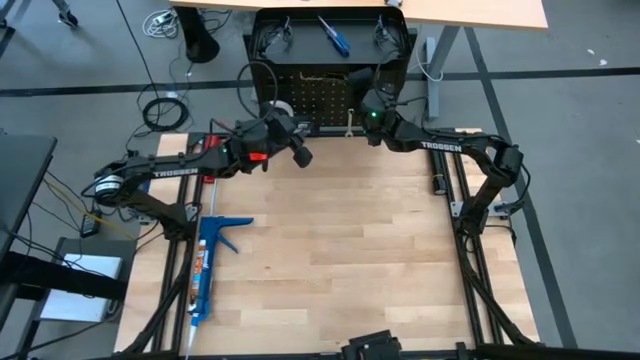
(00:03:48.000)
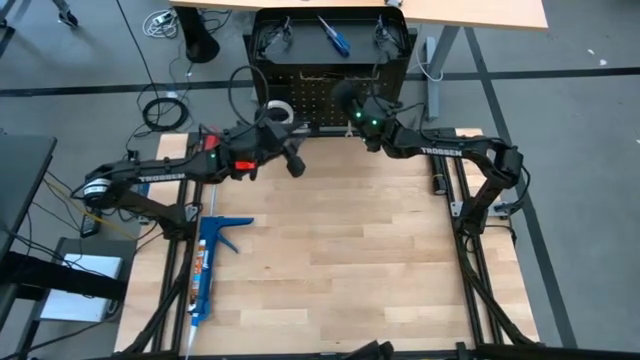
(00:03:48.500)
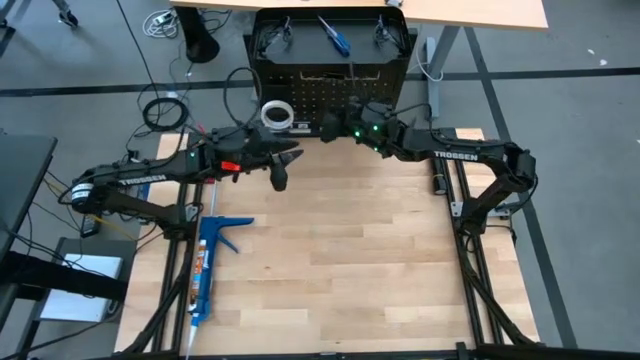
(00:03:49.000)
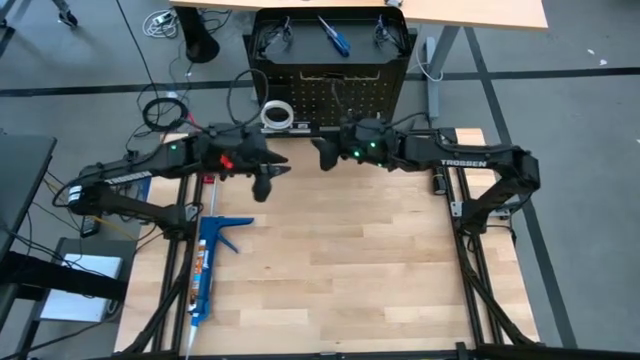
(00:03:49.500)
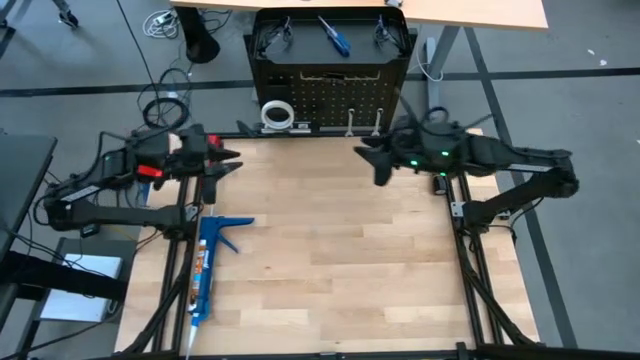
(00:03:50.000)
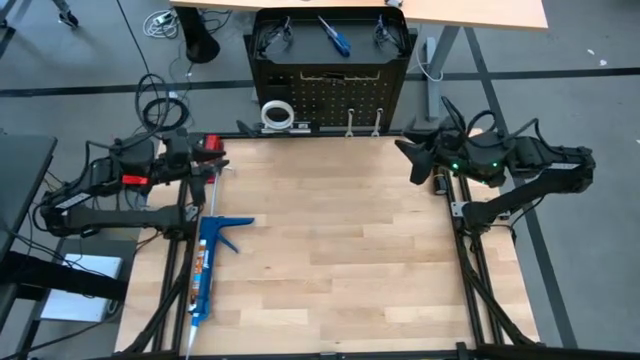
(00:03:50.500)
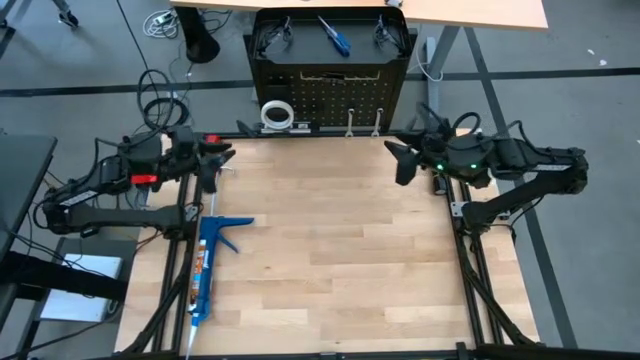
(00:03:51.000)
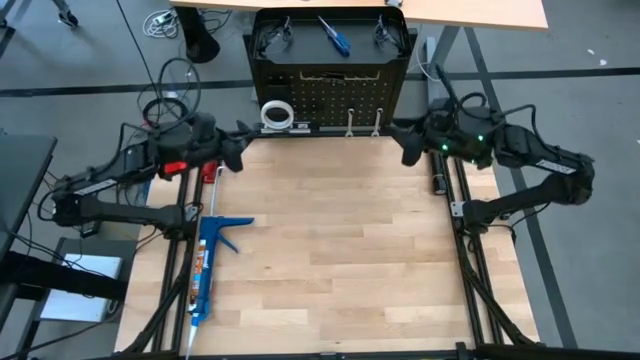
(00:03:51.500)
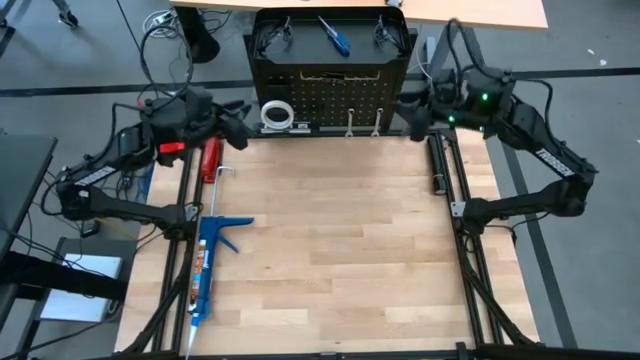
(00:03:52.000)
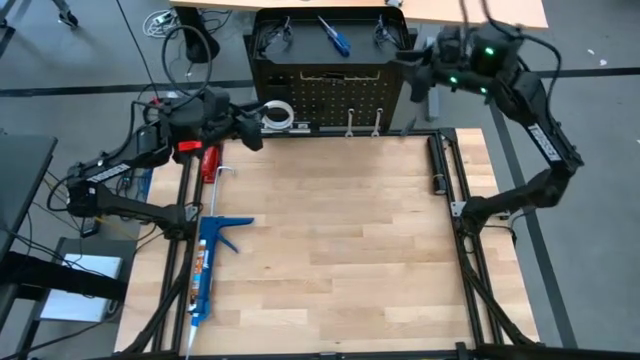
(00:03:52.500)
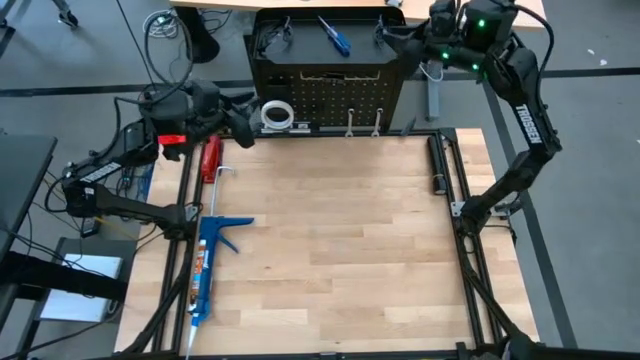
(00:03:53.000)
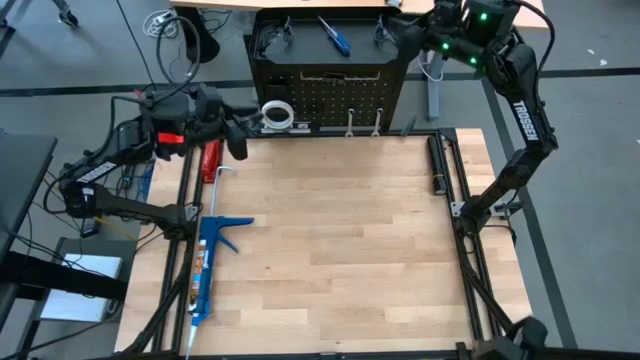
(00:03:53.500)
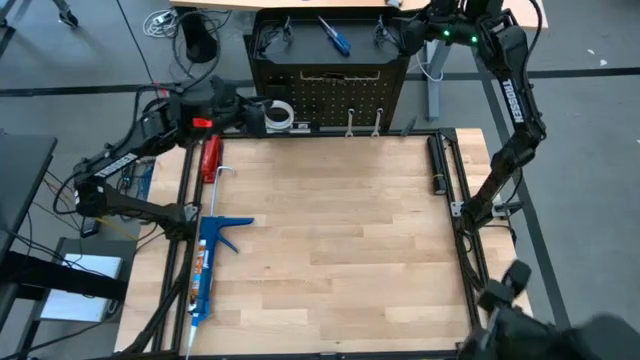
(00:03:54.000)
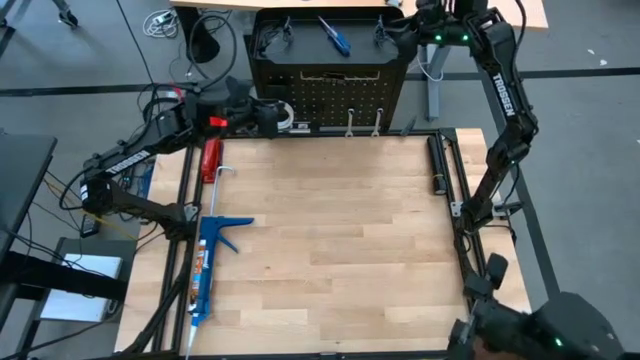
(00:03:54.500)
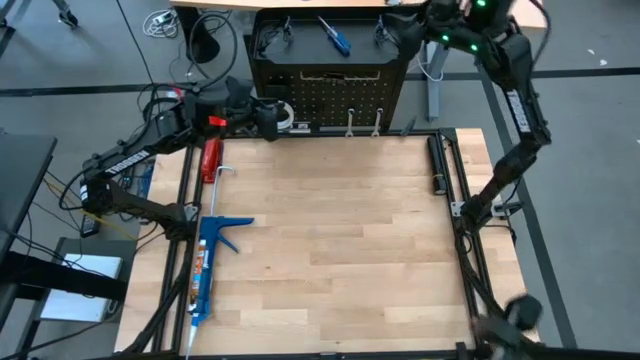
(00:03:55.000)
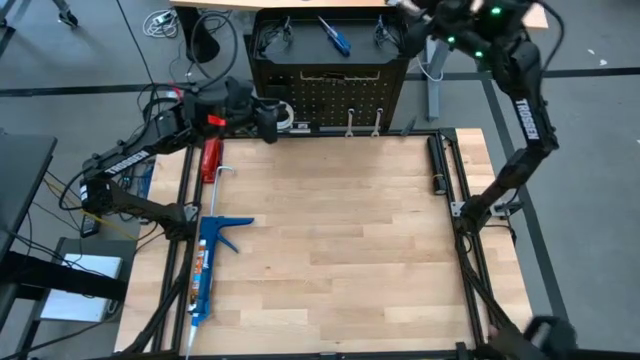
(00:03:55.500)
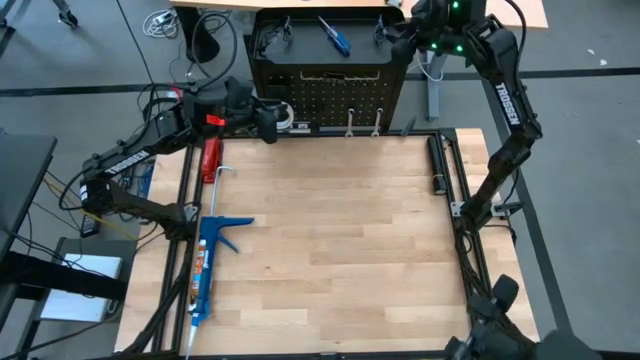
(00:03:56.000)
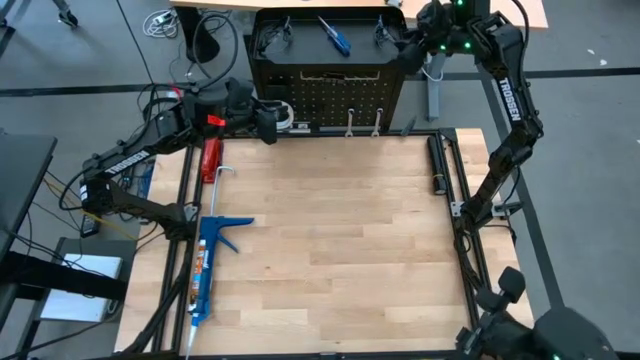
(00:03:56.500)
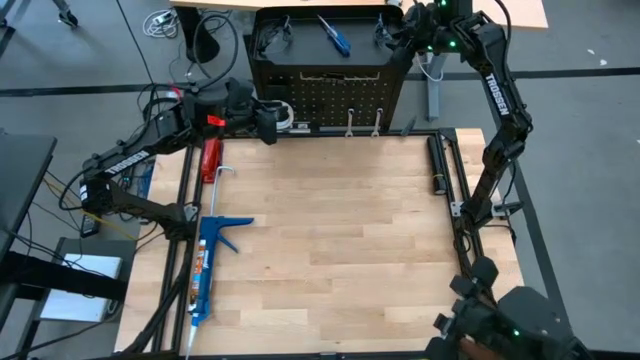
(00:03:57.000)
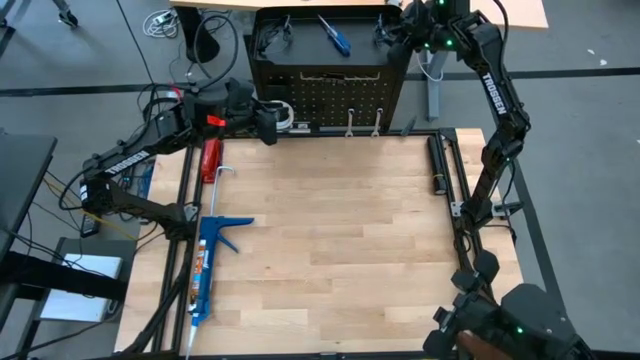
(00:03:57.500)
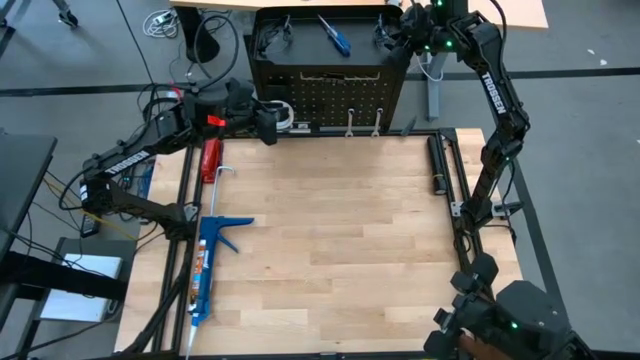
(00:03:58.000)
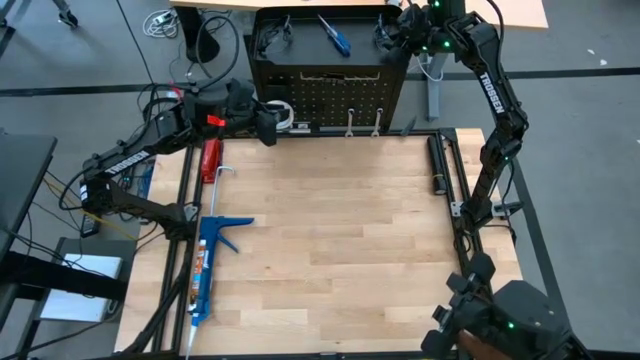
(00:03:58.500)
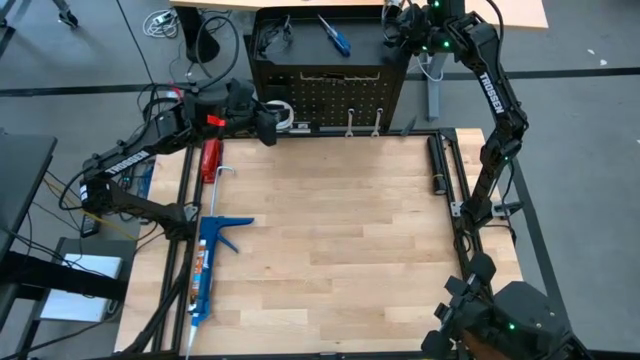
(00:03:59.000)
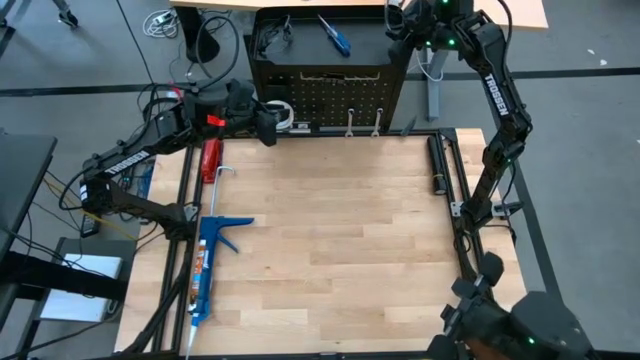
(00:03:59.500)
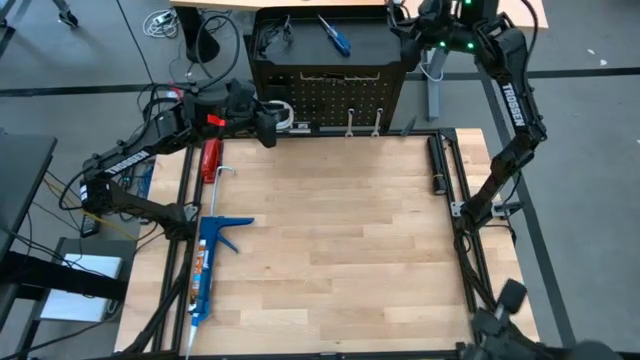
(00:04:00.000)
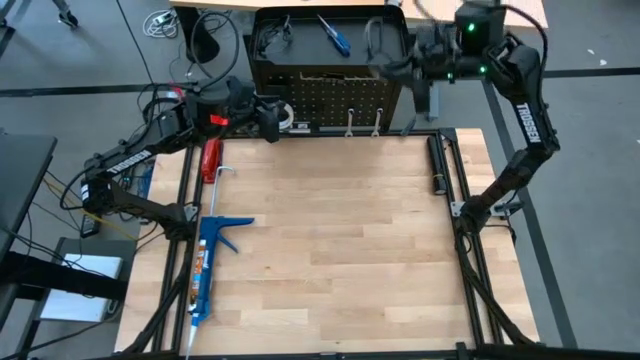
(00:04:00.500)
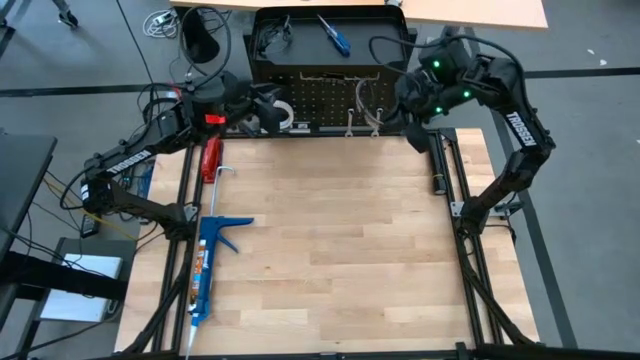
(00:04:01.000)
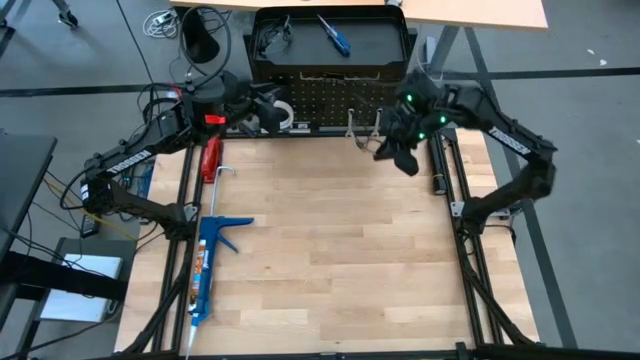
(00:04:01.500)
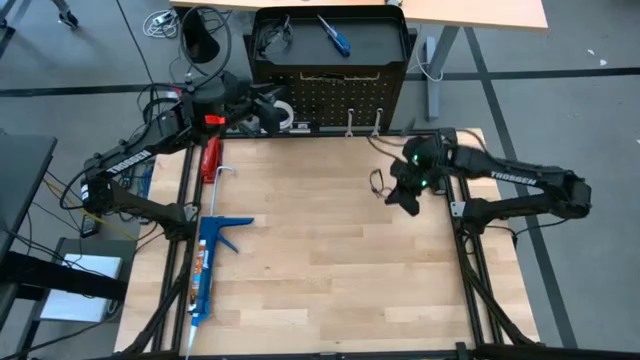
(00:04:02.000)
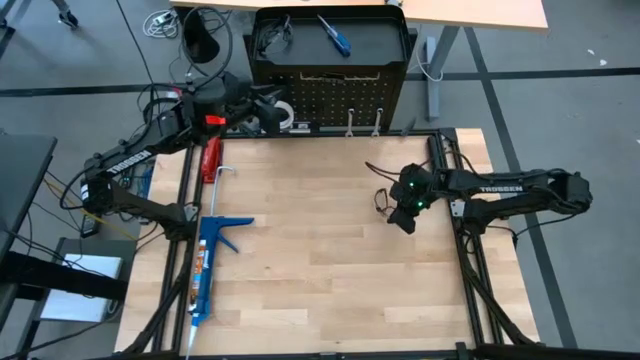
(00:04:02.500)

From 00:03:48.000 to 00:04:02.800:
Task: Hang tools onto peg board
Remove the right black safety glasses from the black pegboard

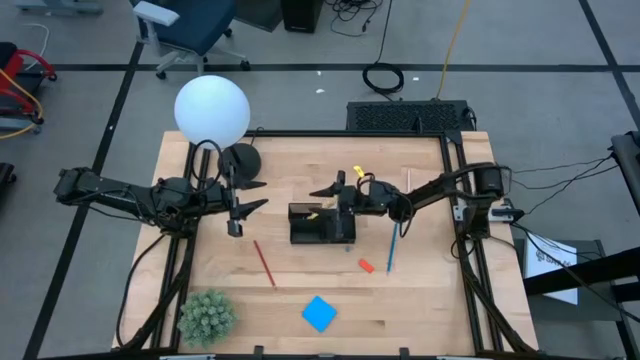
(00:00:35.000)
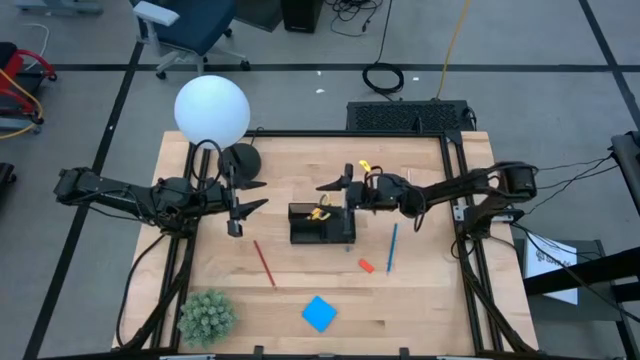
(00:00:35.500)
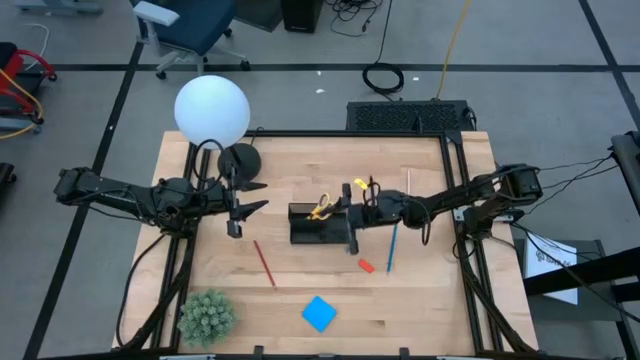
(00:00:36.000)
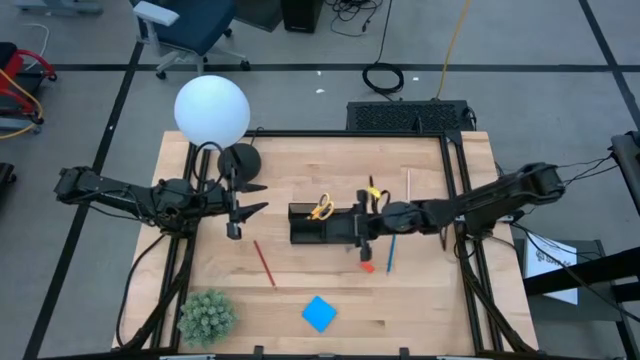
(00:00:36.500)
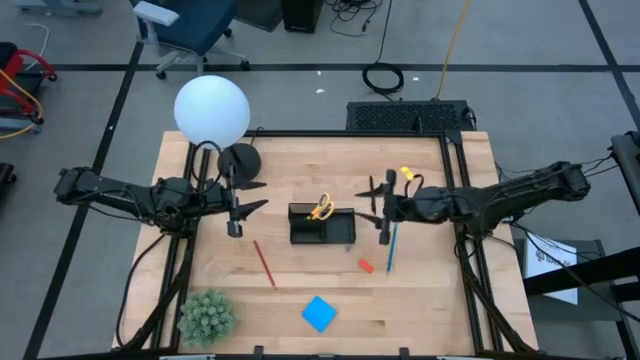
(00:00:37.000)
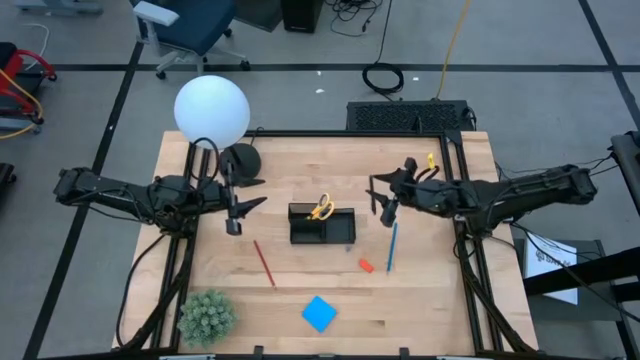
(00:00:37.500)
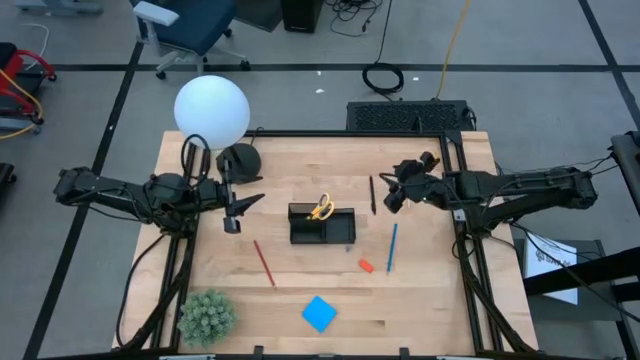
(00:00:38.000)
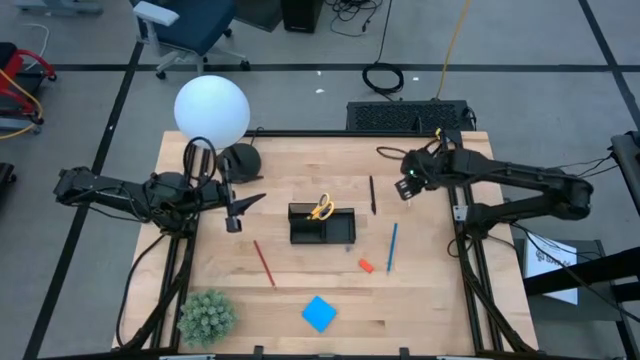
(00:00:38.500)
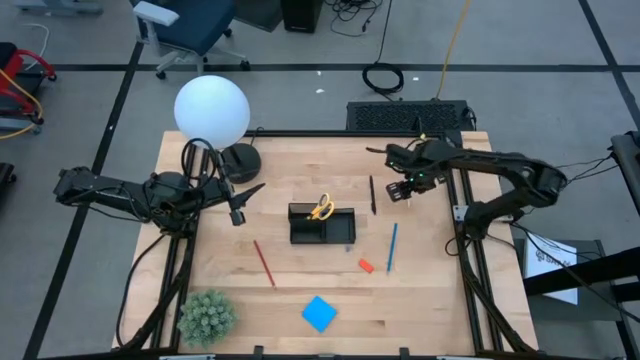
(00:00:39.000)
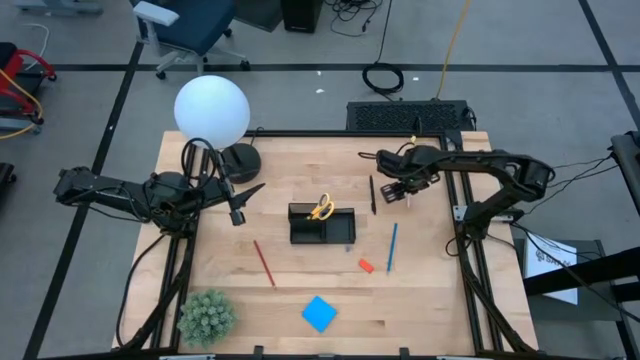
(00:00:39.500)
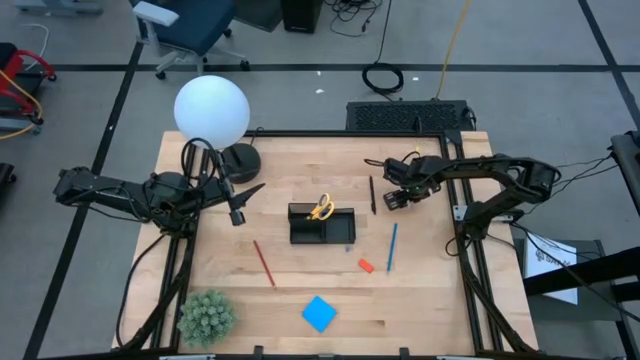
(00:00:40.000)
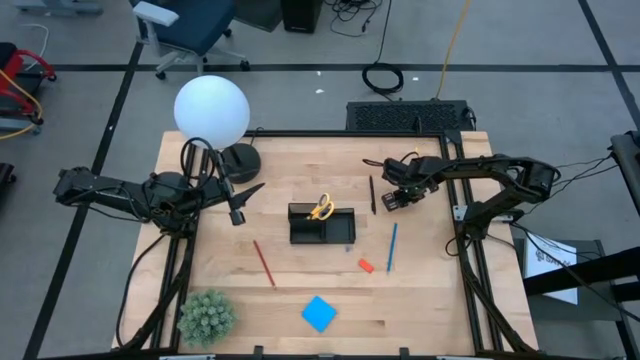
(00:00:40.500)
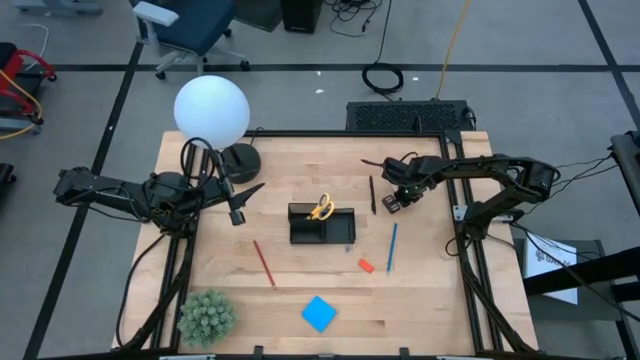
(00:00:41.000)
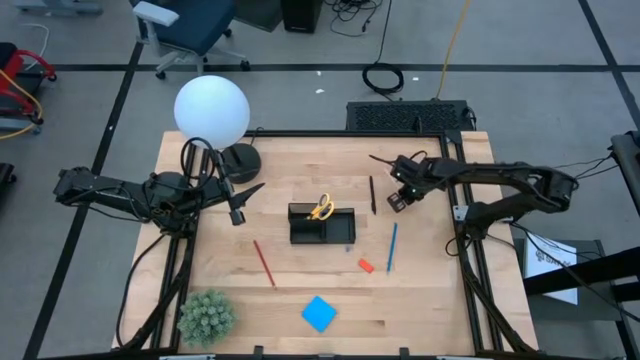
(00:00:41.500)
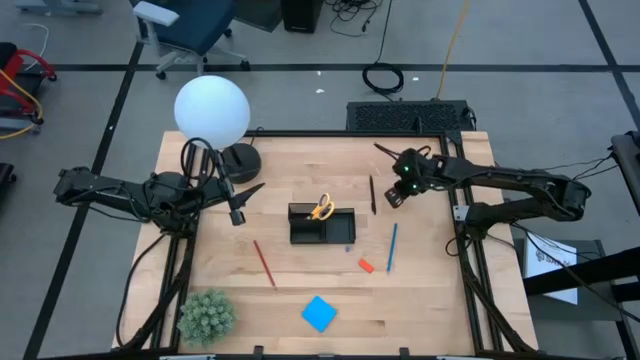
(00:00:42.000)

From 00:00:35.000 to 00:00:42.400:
Task: Pick and place office supplies into organizer
Put the light pink pen into the desk organizer
